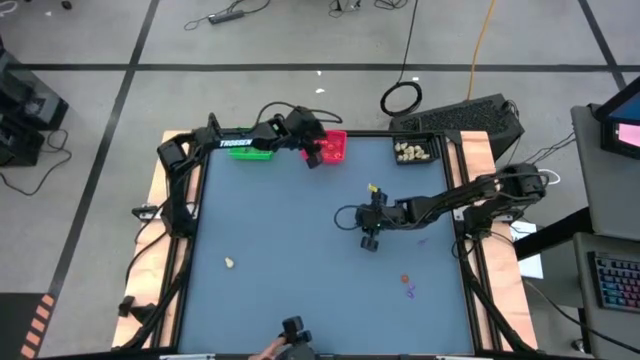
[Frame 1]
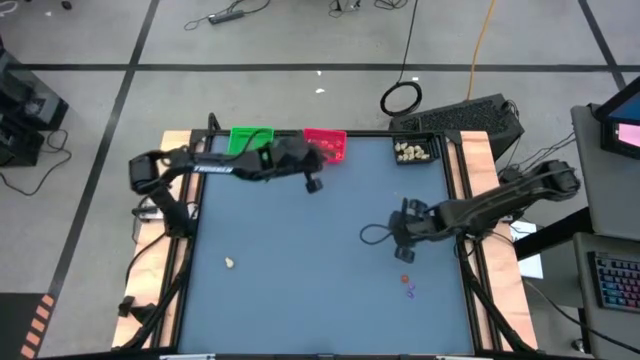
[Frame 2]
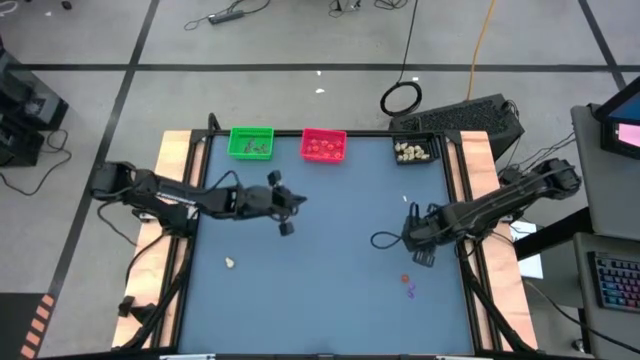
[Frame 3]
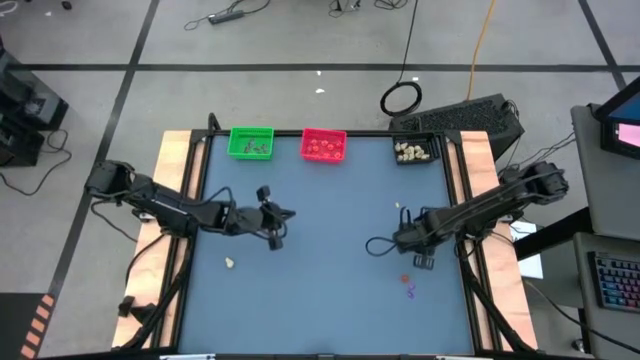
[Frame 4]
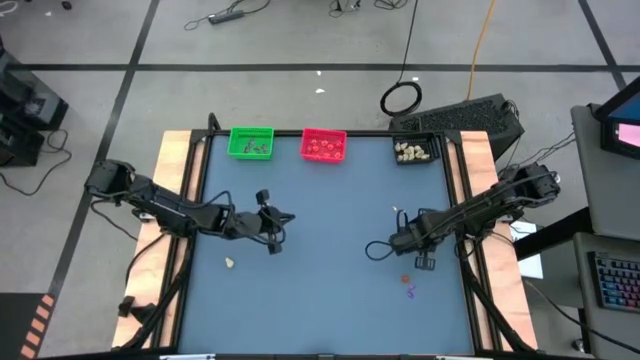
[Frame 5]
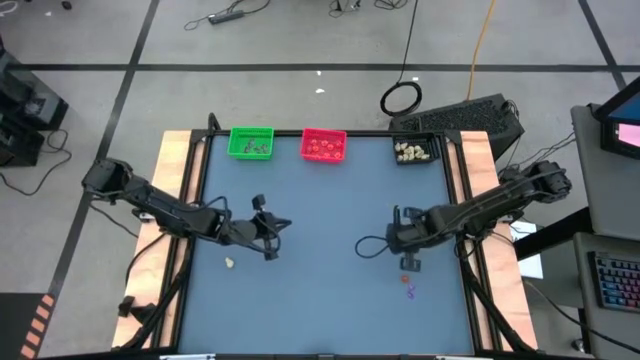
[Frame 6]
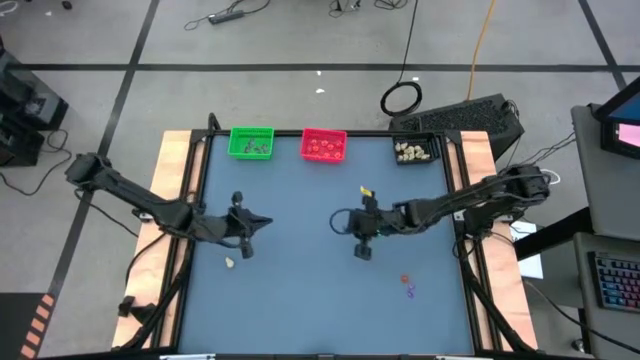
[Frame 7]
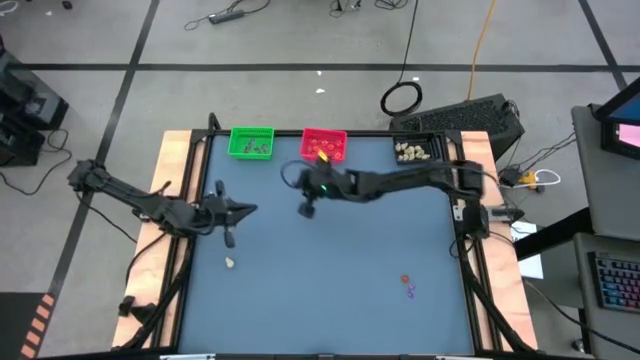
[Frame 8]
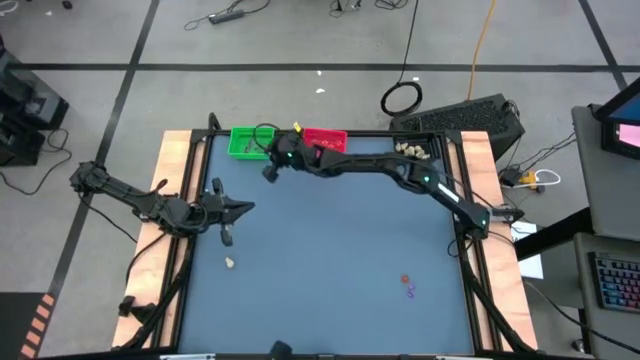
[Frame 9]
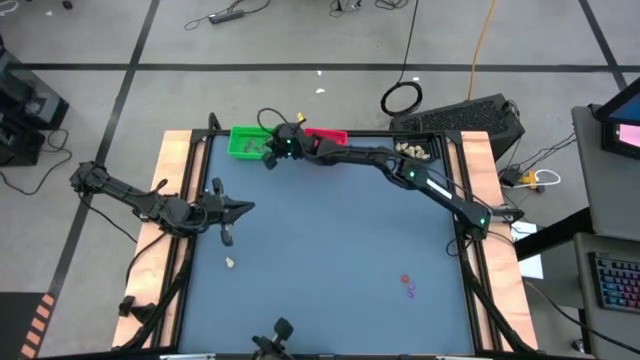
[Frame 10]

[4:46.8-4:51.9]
Task: Sort Halloween decoration
Put the purple witch hat toy into the green bin

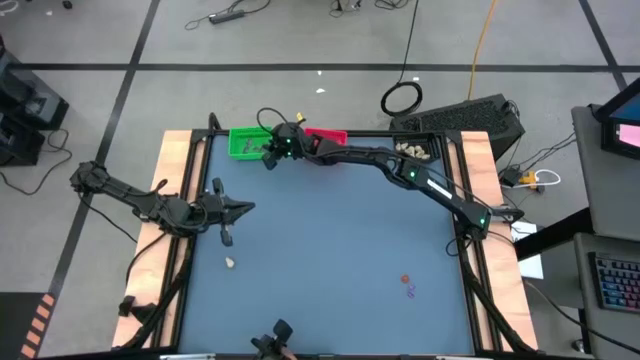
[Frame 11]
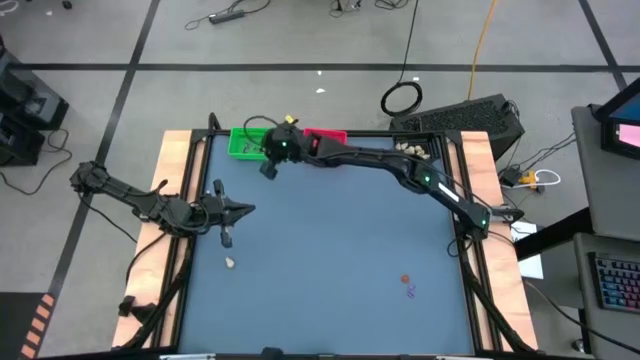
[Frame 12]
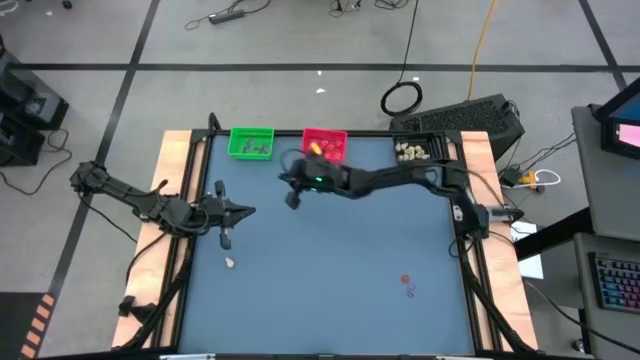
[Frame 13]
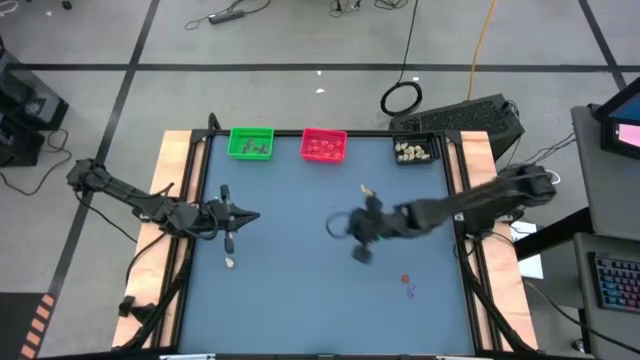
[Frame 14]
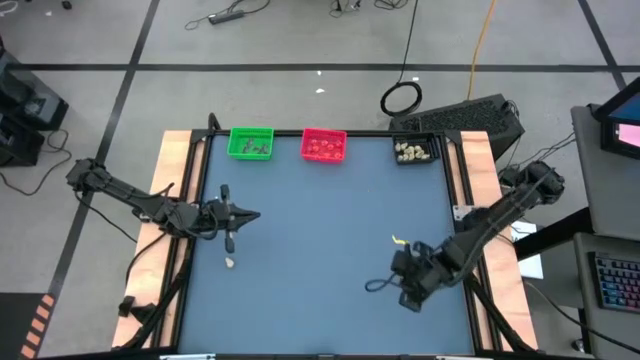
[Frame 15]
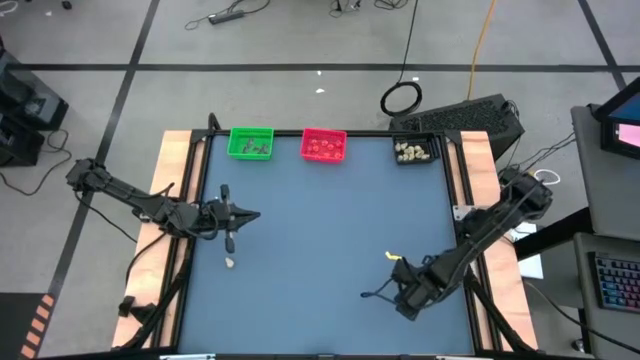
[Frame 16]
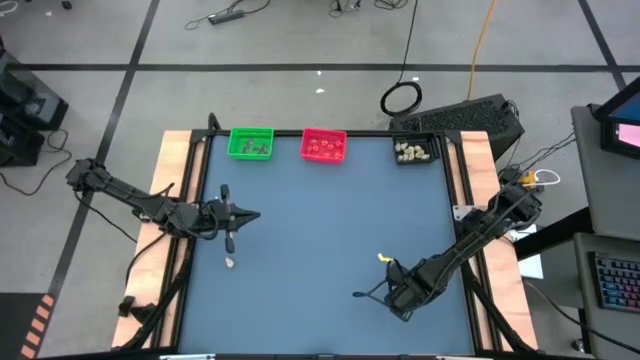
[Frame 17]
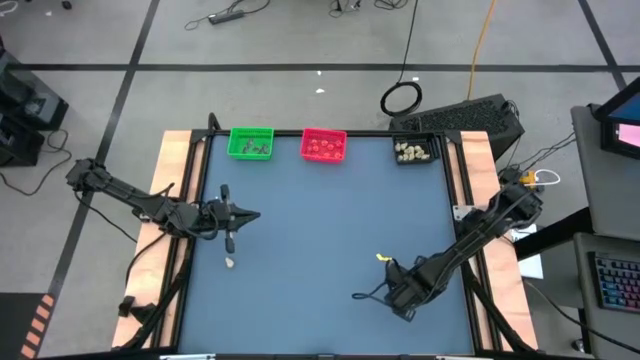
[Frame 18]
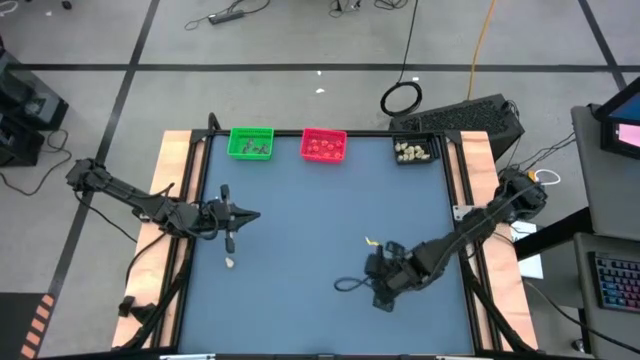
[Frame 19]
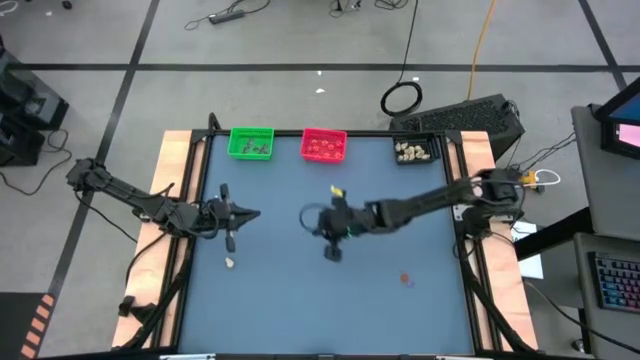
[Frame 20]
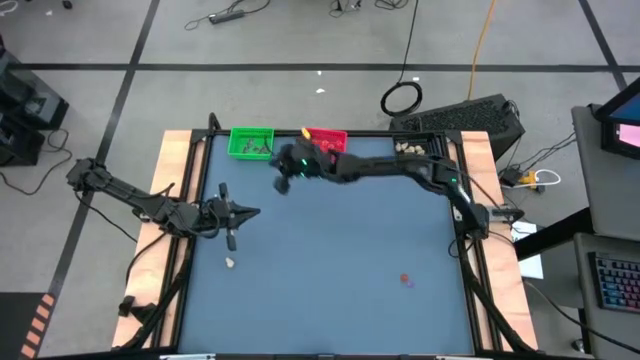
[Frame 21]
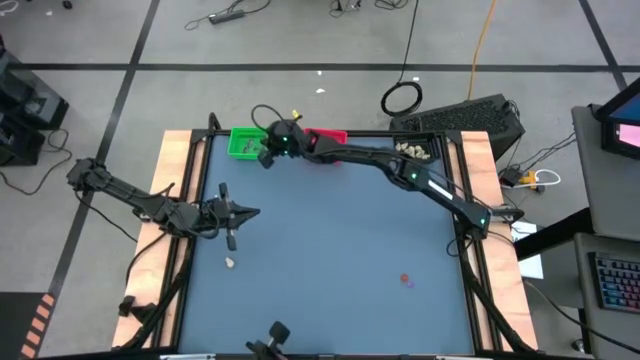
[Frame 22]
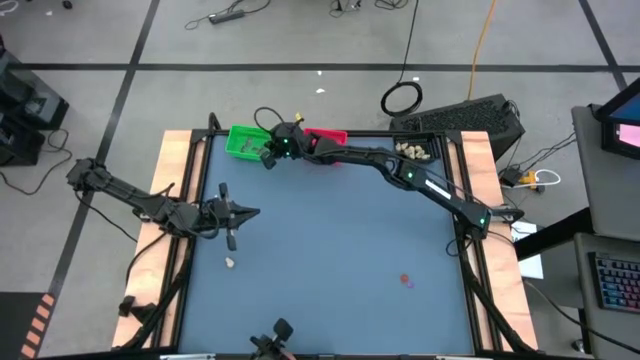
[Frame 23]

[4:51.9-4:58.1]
Put the purple witch hat toy into the green bin

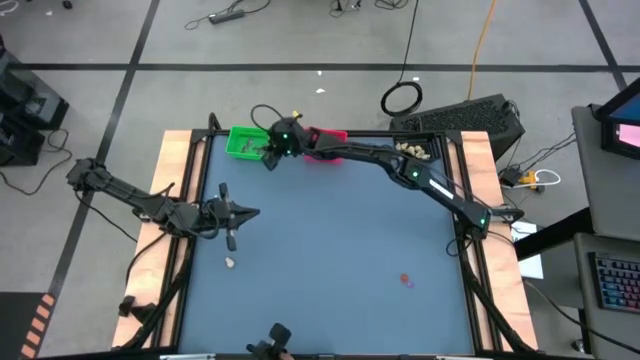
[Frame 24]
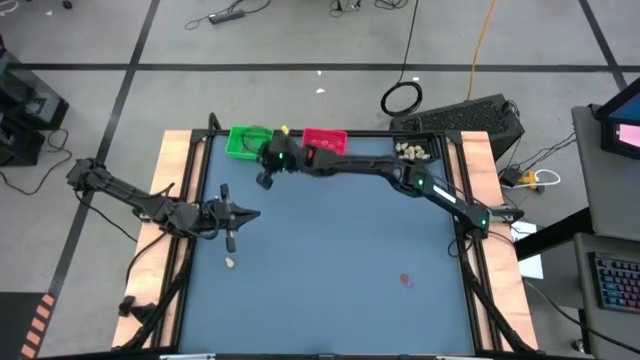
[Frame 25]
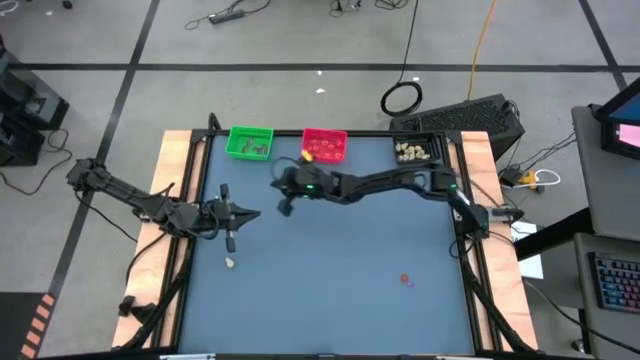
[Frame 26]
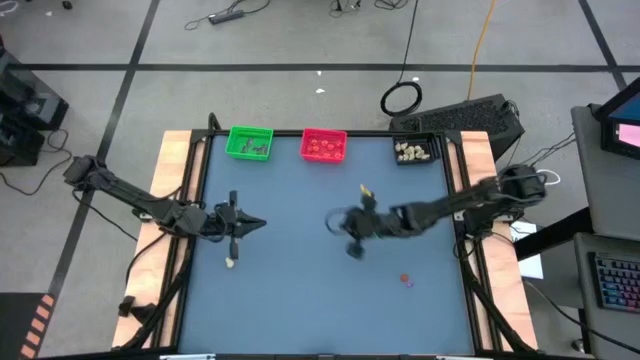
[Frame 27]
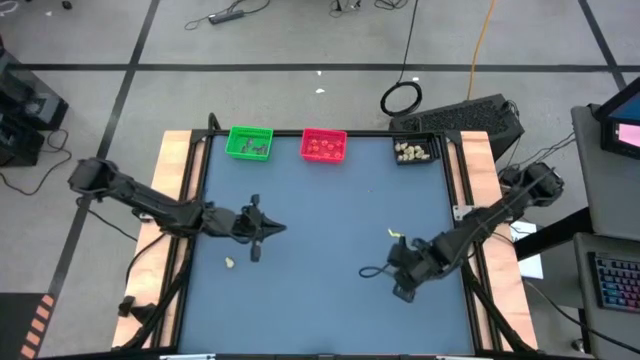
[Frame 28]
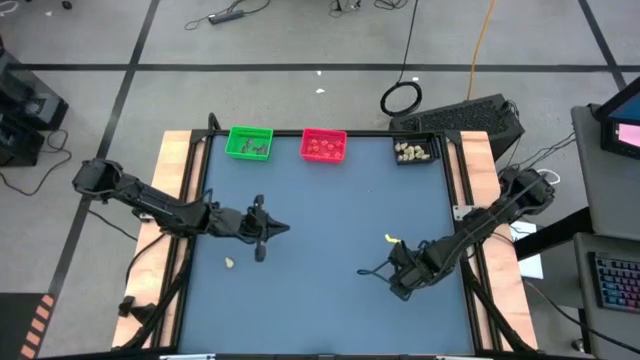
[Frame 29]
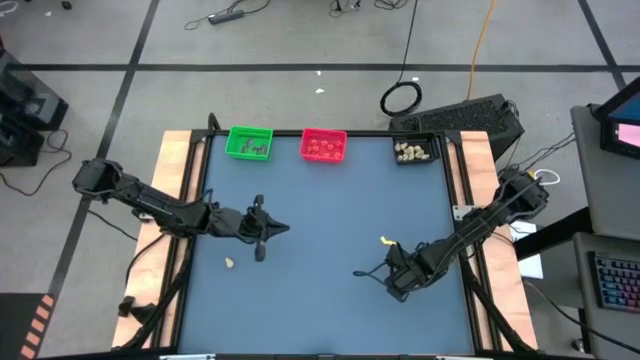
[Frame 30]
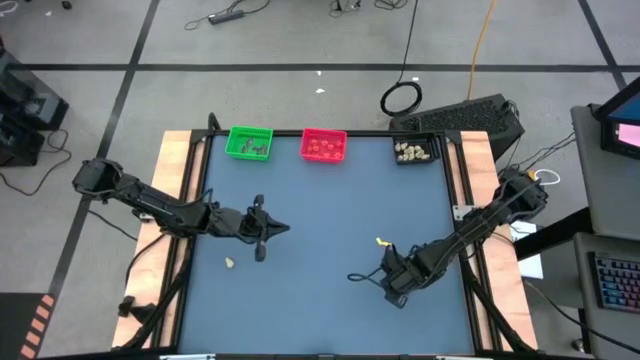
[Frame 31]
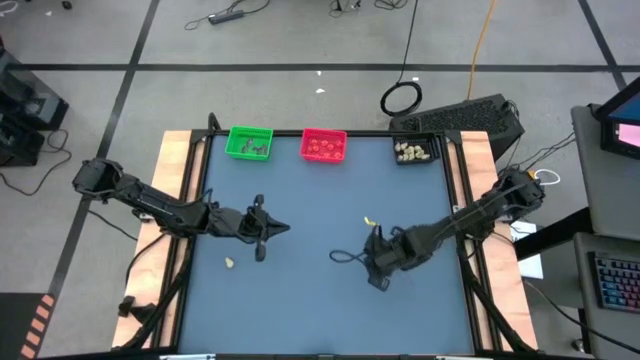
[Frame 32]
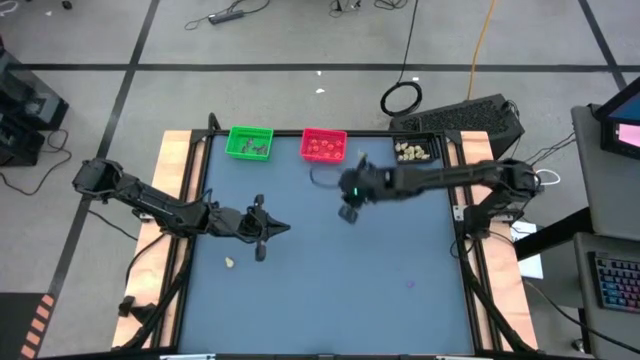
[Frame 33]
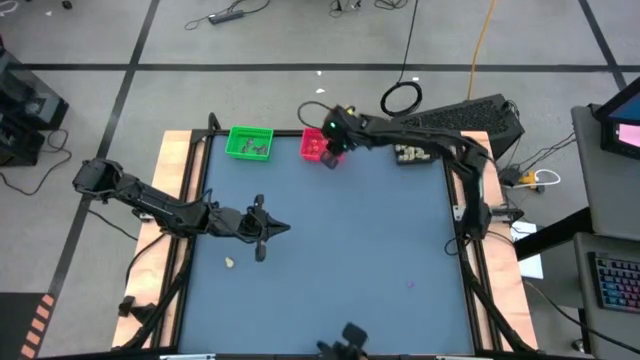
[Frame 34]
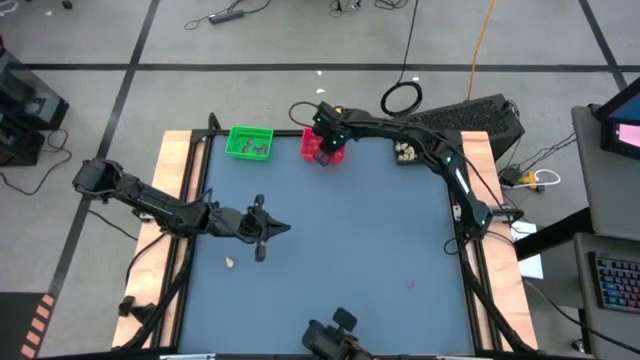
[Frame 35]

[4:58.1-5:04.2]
Put the orange pumpkin toy into the red bin

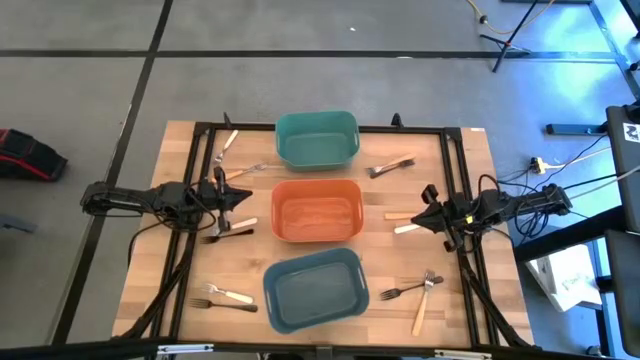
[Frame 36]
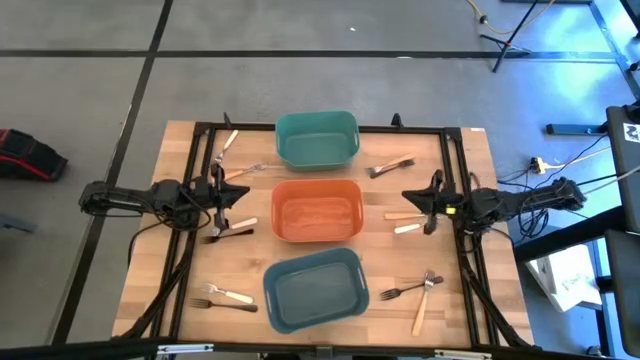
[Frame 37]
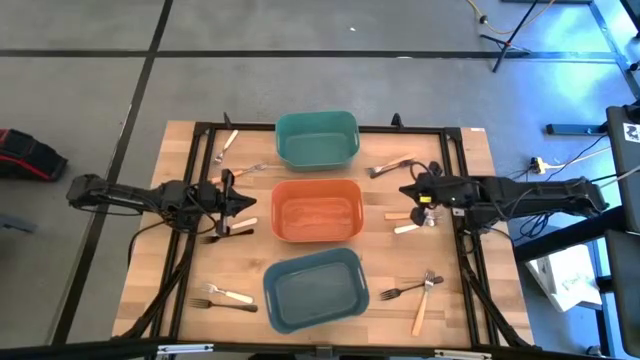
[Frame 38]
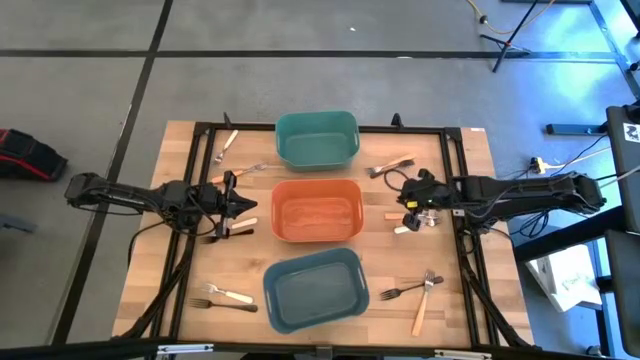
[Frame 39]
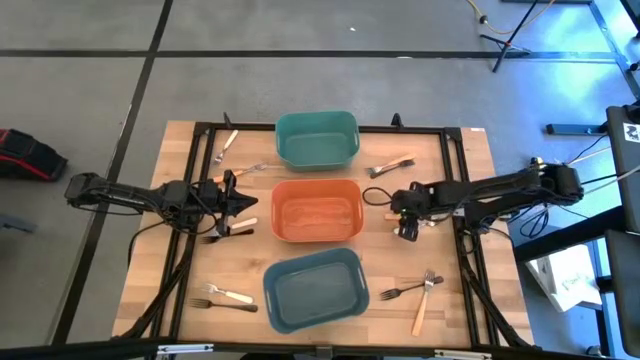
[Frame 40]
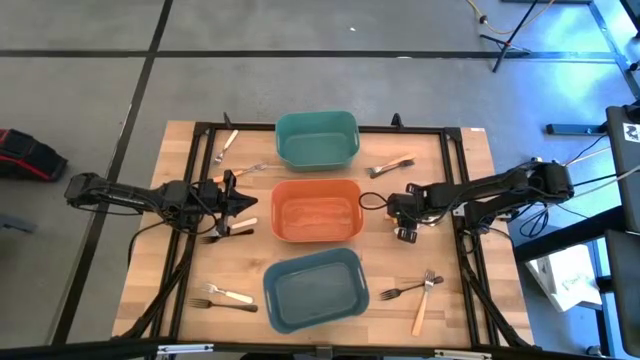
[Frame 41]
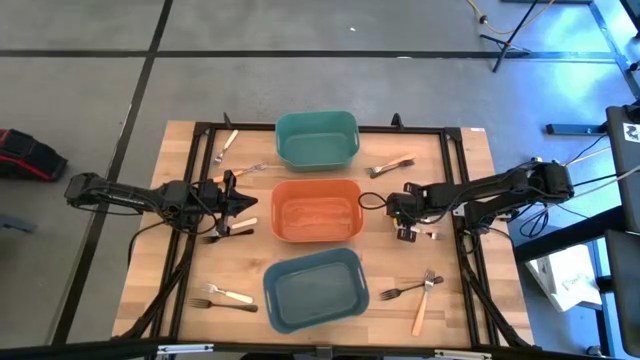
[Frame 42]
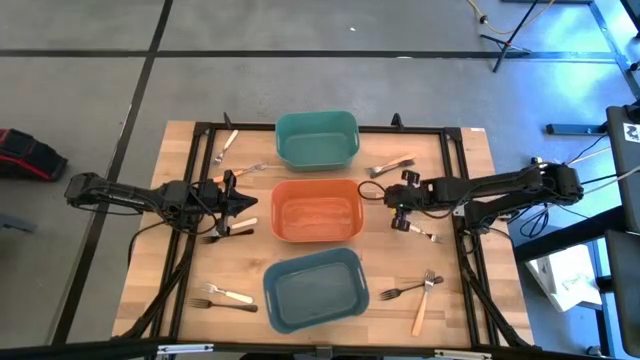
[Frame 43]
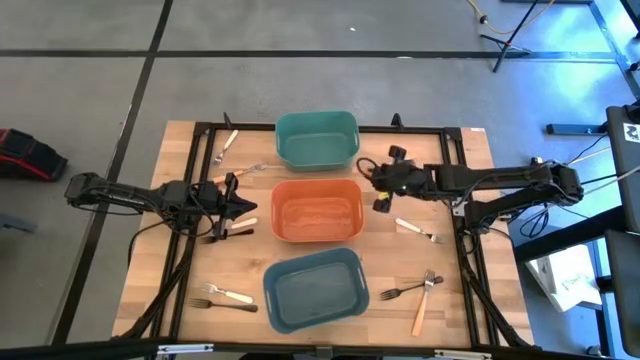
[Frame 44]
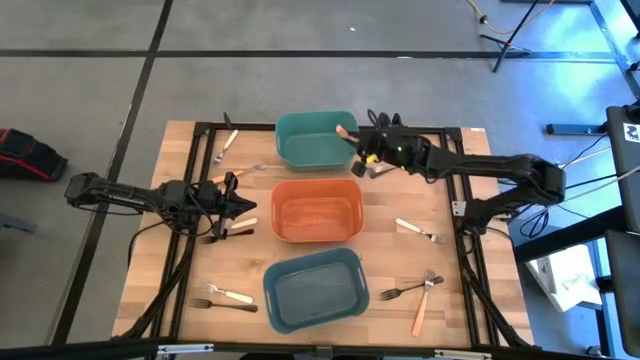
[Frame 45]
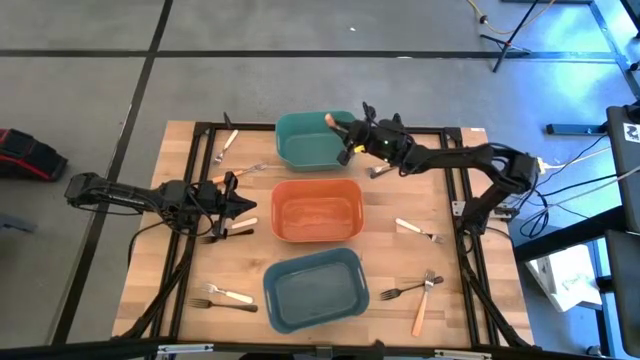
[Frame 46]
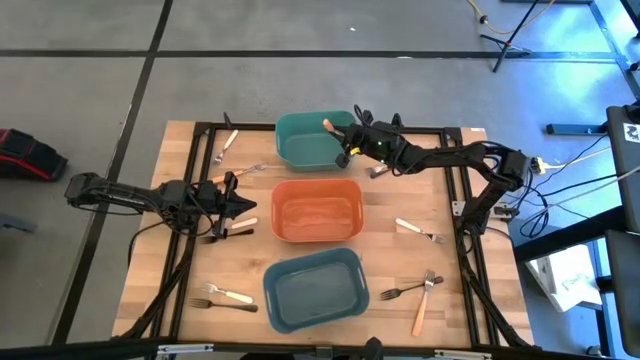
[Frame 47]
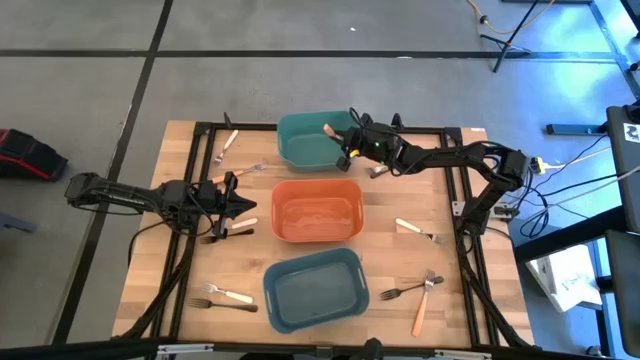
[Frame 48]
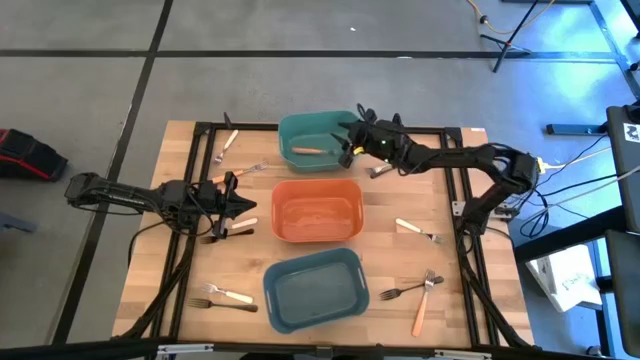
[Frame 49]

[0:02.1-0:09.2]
Task: Sort silverware by color (type)
Put the orange fork into the green bin
